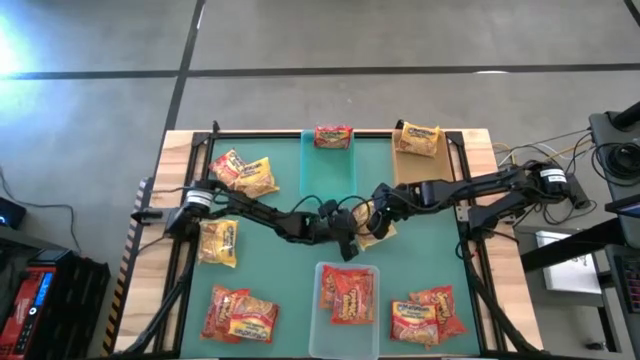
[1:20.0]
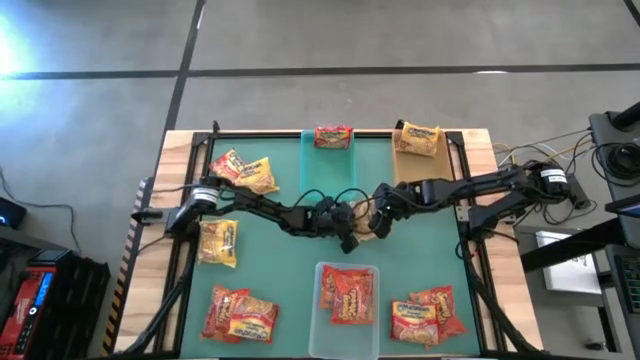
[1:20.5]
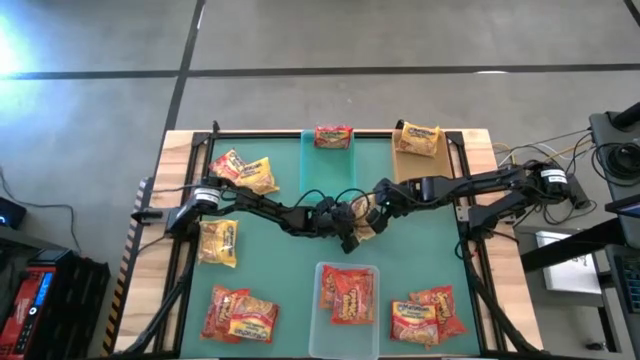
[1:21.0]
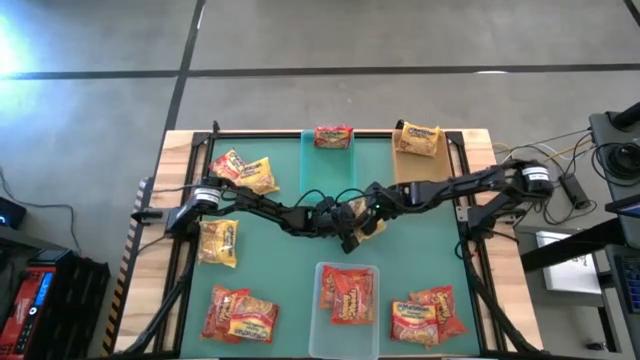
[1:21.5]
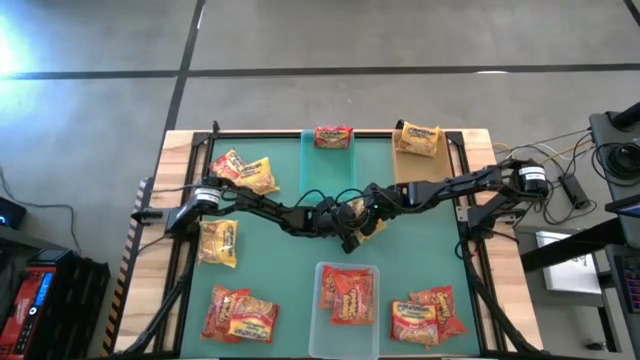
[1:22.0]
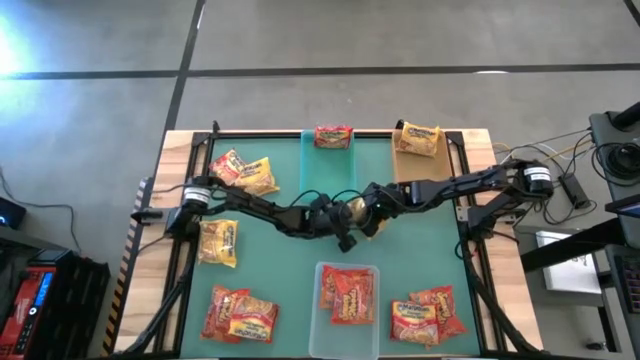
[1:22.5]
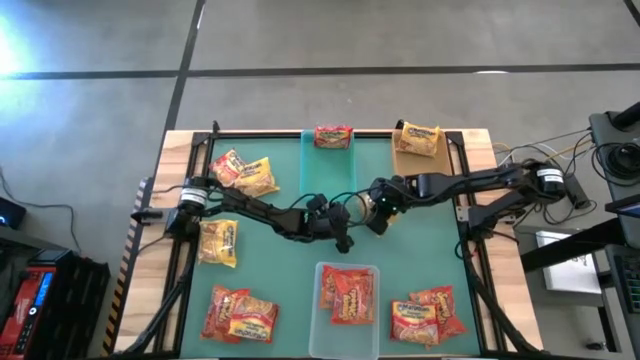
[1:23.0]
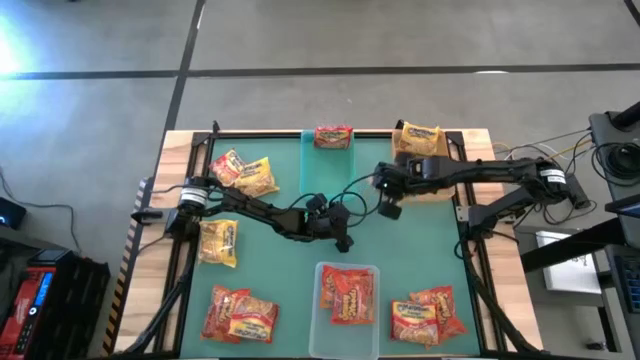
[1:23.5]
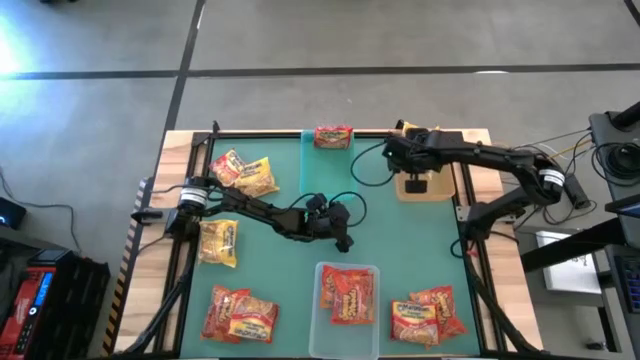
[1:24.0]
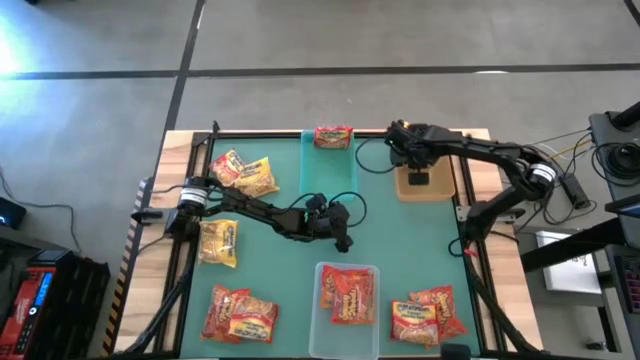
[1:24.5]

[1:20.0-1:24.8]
Task: Sort Maruchan noodles
Put the right yellow pack noodle into the yellow bin

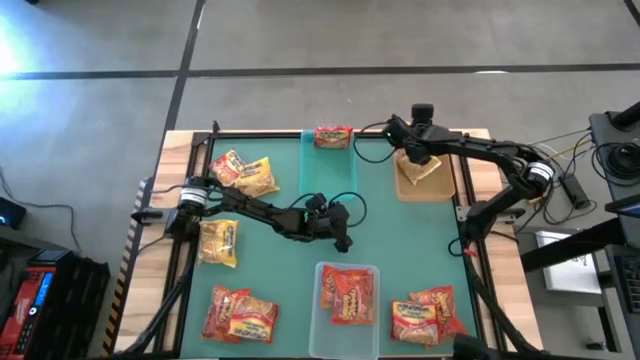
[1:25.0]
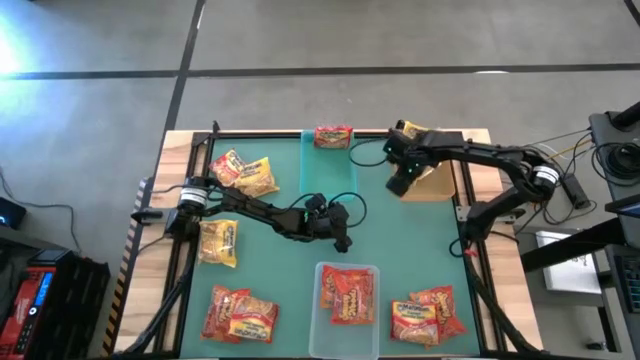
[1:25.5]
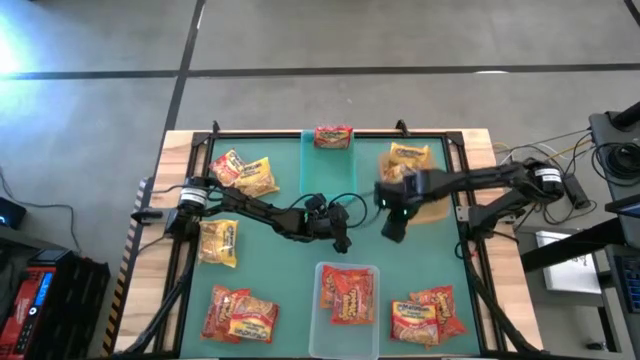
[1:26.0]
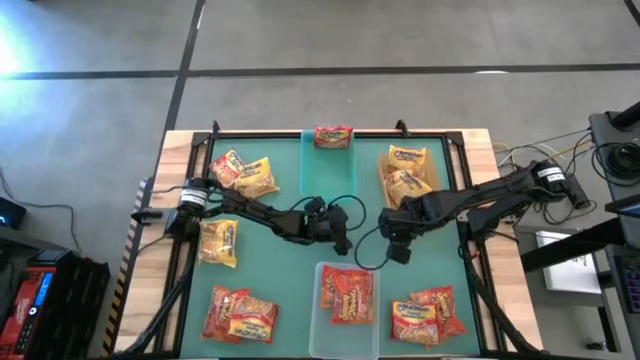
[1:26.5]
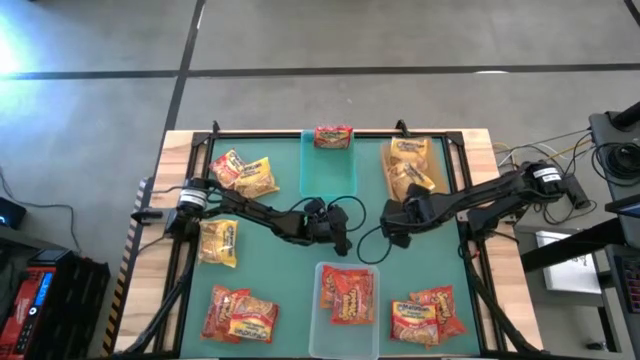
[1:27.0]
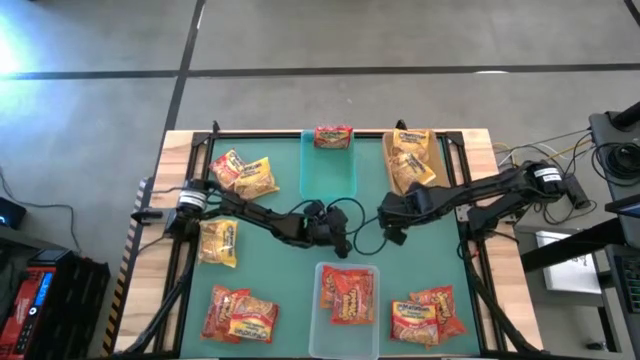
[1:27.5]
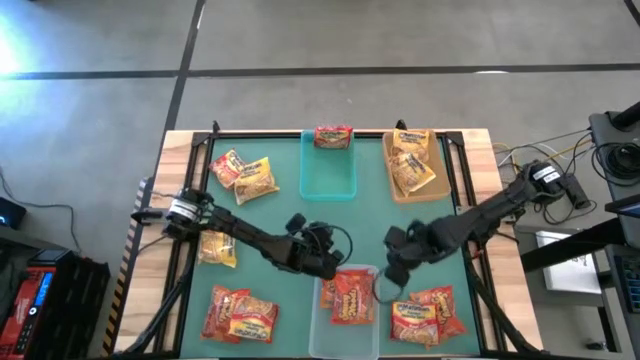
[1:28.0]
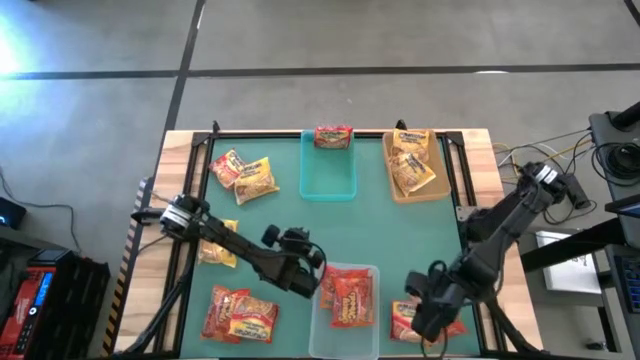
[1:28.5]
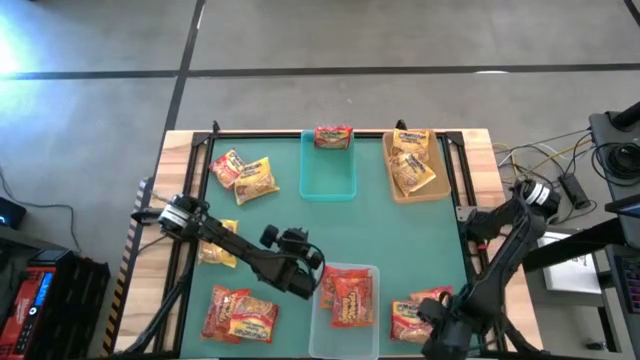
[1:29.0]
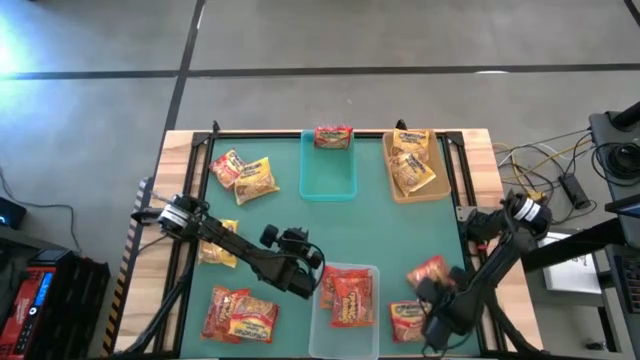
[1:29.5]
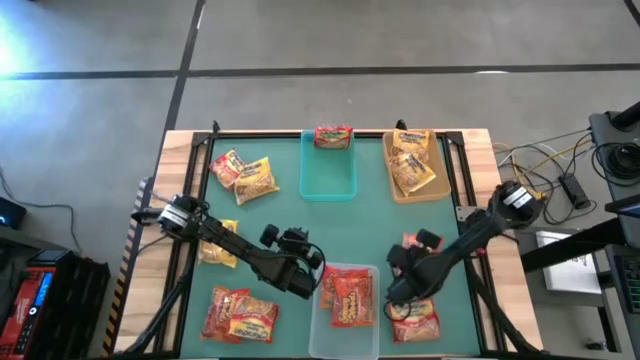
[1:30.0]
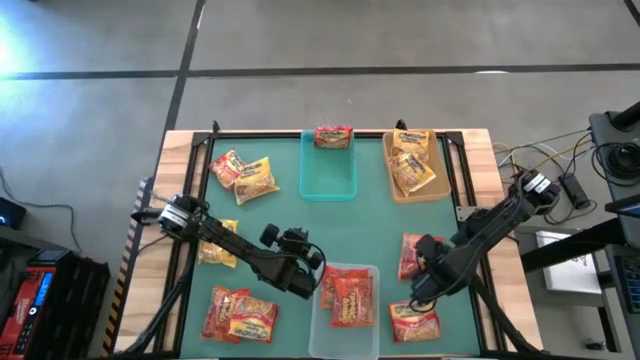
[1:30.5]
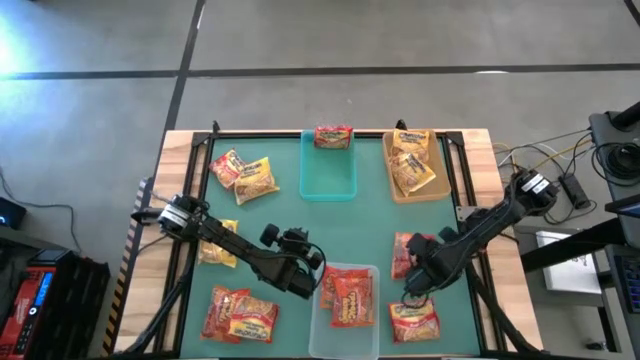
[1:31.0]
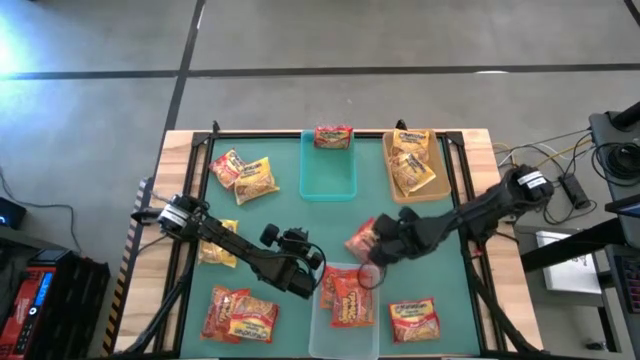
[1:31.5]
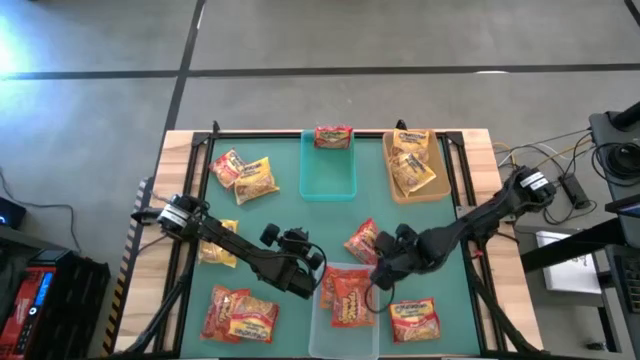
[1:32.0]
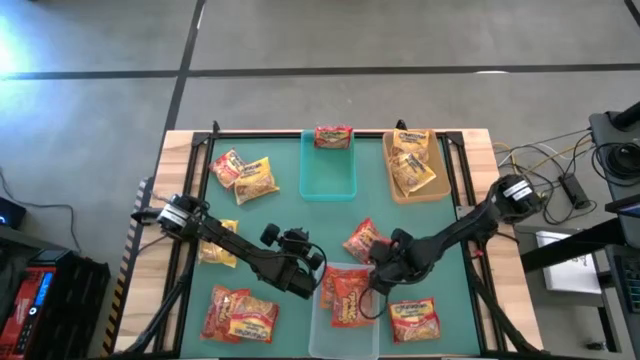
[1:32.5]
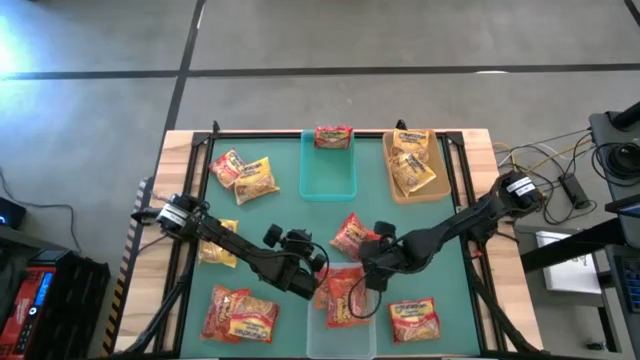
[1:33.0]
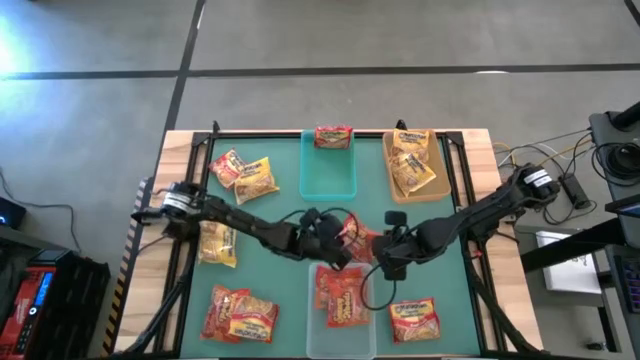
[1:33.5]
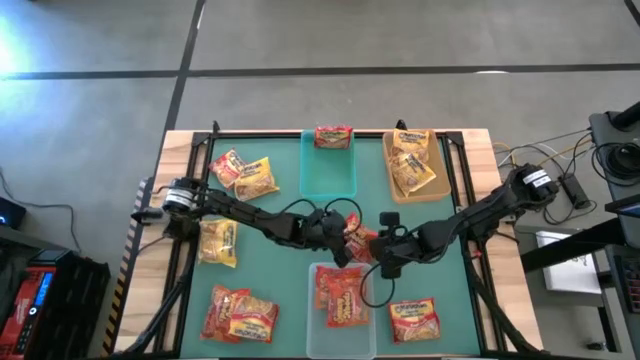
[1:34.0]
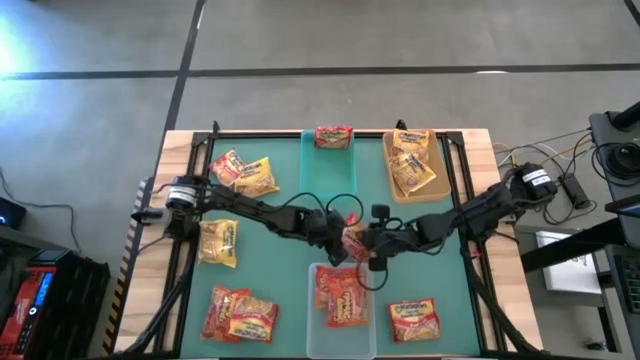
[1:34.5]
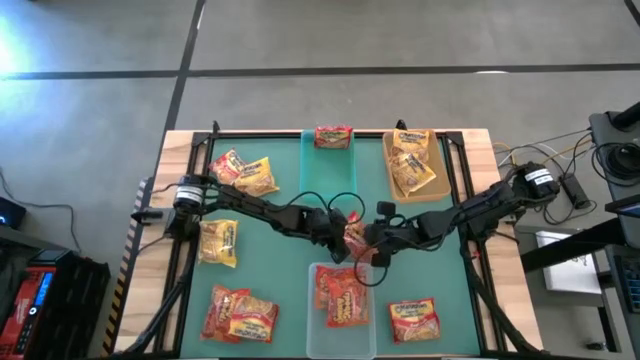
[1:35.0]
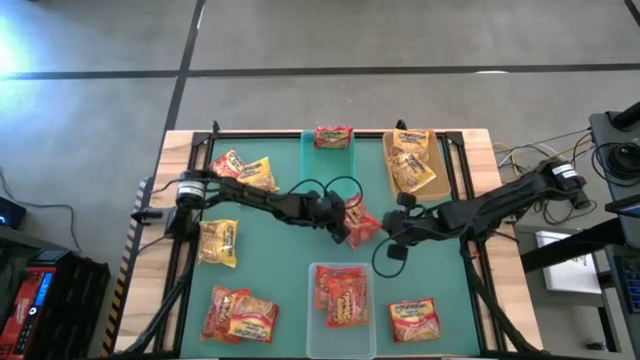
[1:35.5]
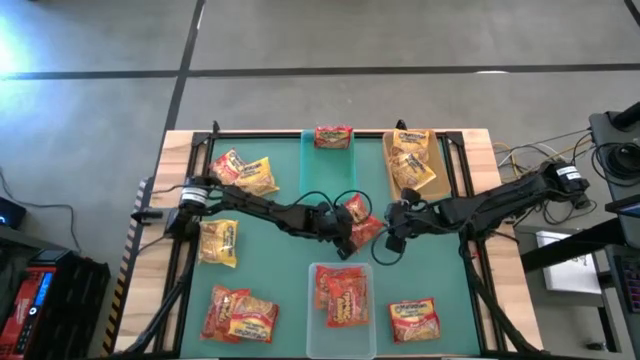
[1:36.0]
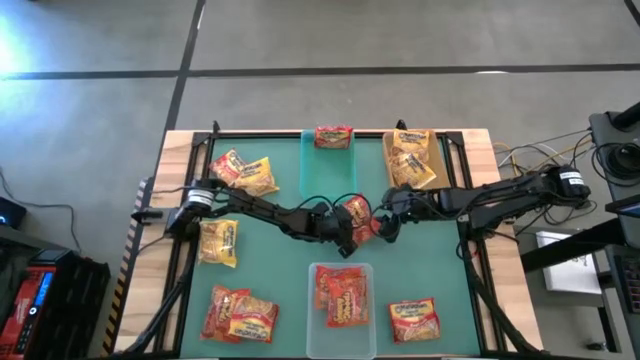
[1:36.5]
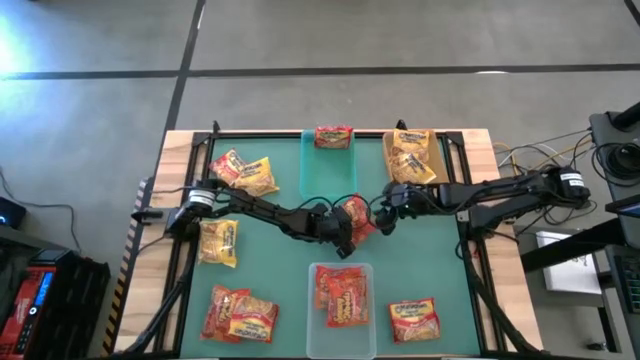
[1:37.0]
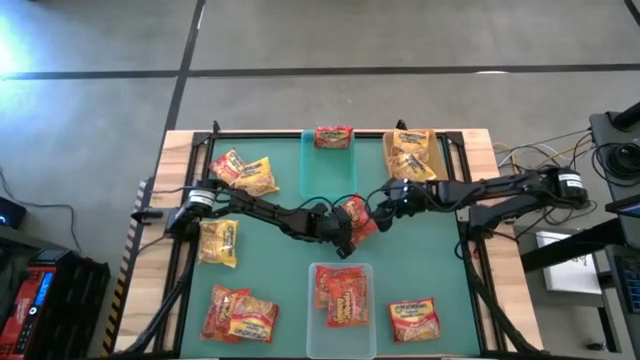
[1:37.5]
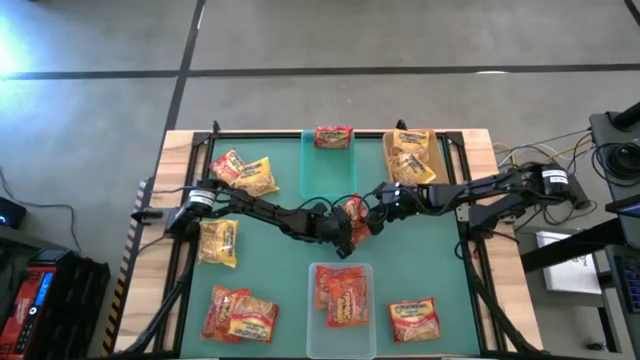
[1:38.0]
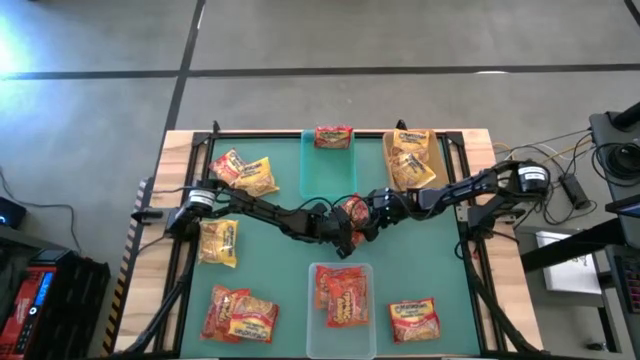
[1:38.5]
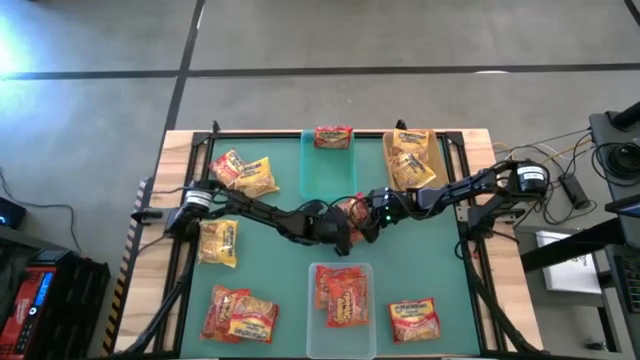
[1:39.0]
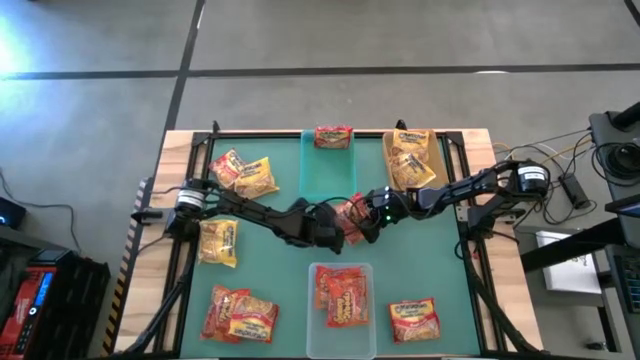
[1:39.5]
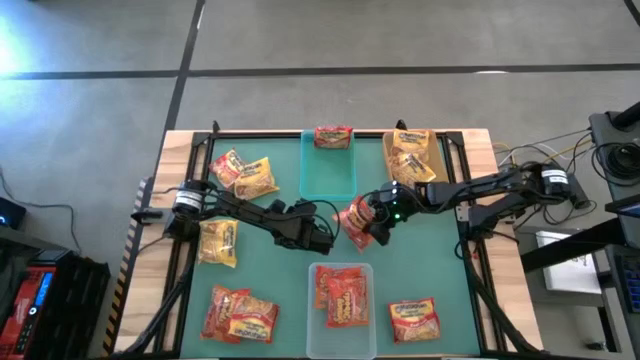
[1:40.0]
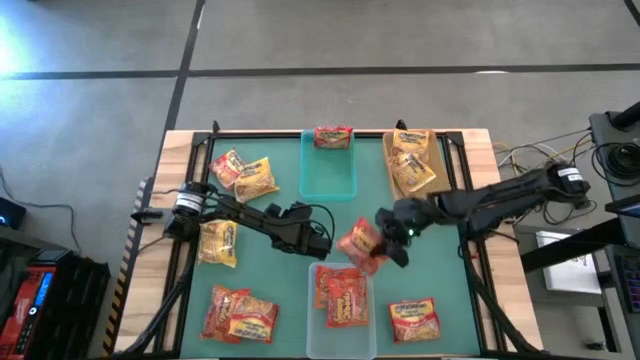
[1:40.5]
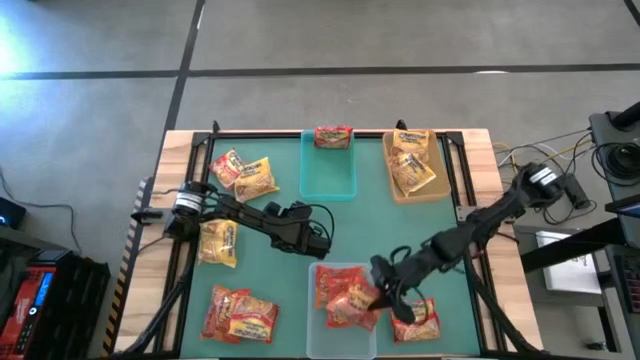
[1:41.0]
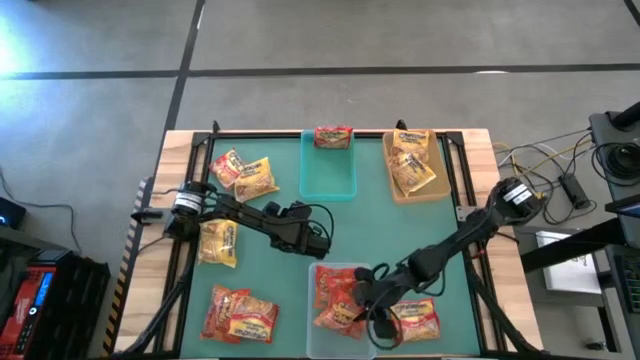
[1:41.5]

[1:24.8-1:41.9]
Put the right orange noodle pack into the transparent bin
